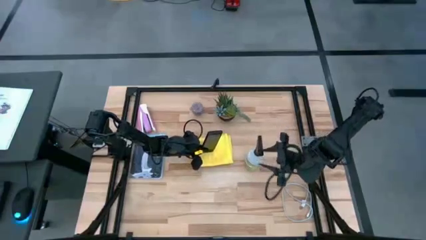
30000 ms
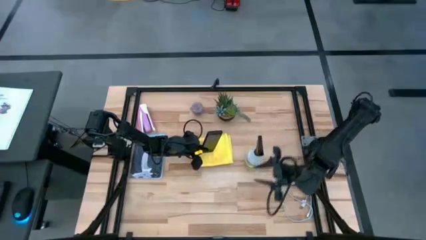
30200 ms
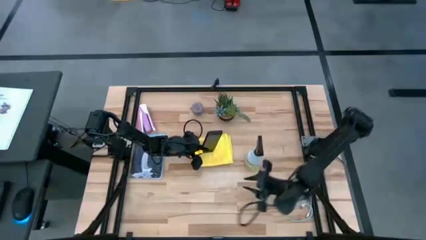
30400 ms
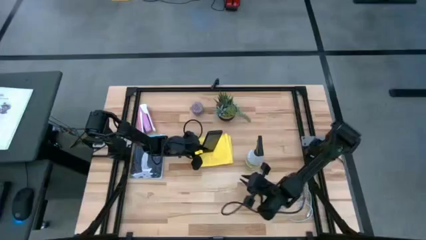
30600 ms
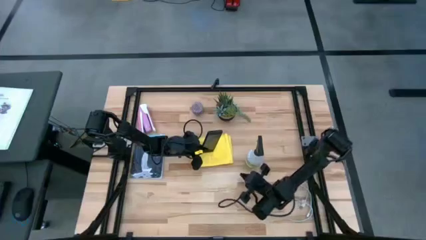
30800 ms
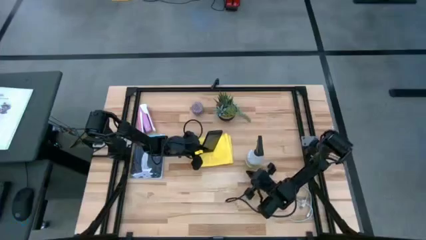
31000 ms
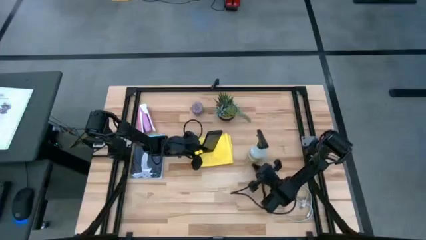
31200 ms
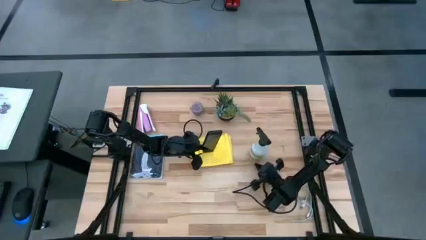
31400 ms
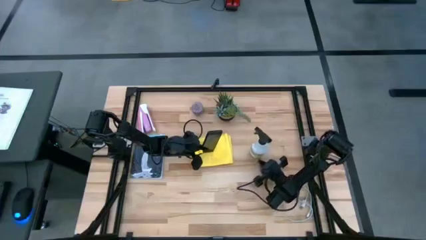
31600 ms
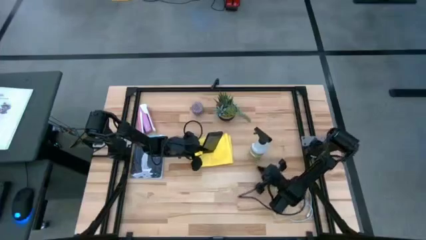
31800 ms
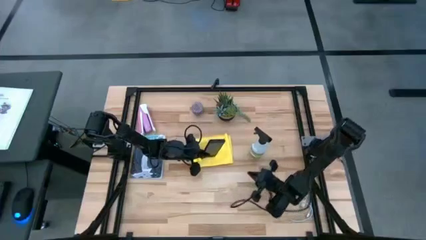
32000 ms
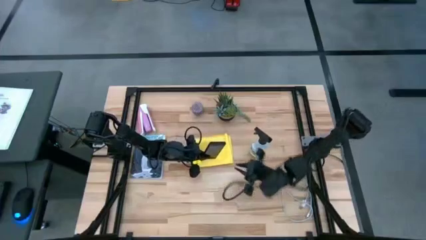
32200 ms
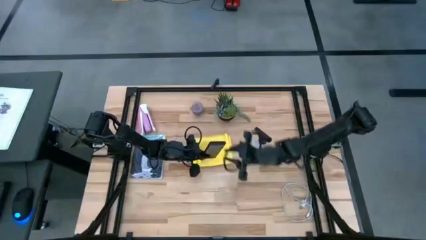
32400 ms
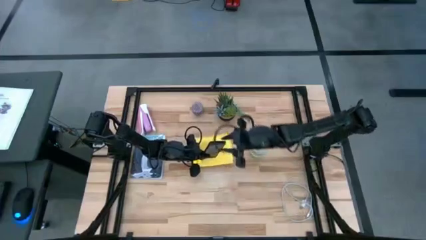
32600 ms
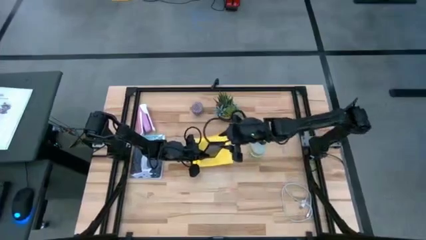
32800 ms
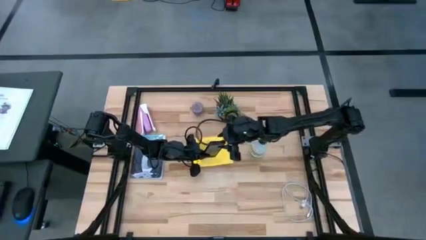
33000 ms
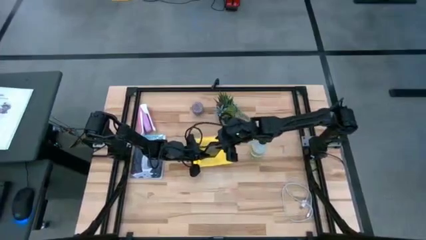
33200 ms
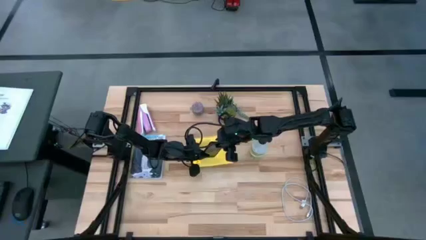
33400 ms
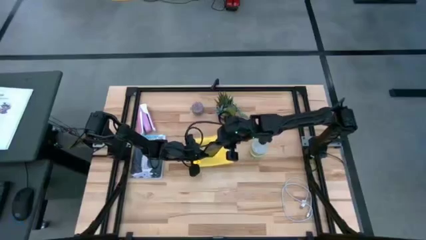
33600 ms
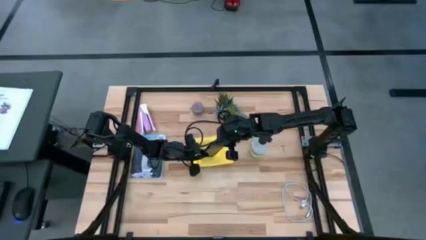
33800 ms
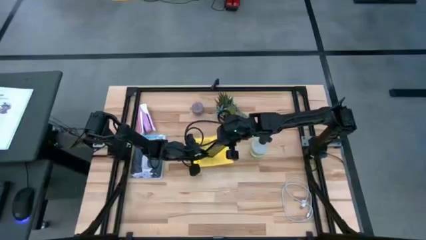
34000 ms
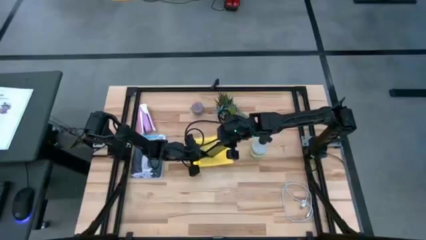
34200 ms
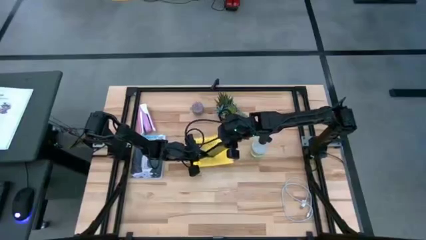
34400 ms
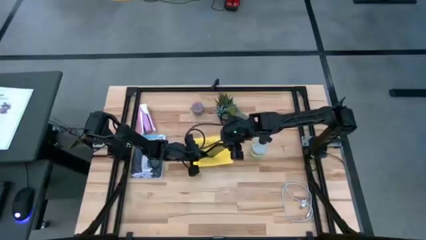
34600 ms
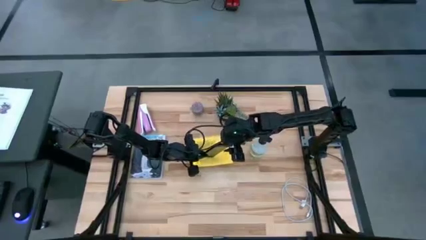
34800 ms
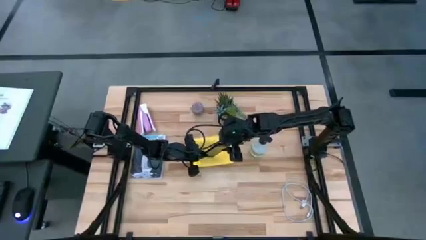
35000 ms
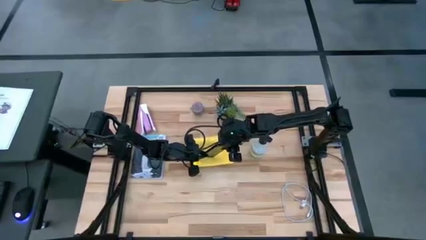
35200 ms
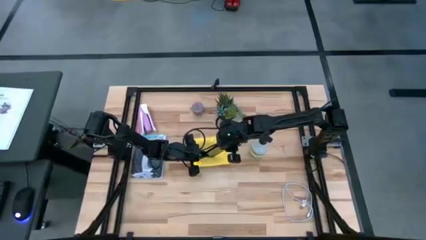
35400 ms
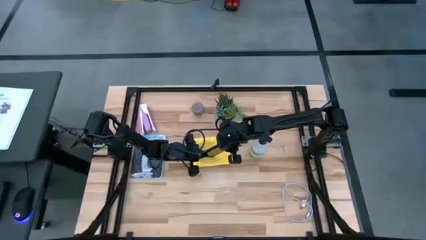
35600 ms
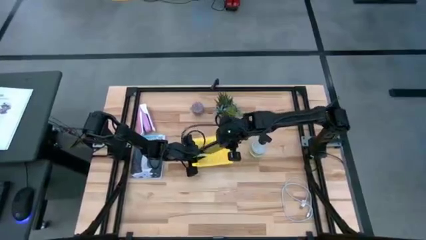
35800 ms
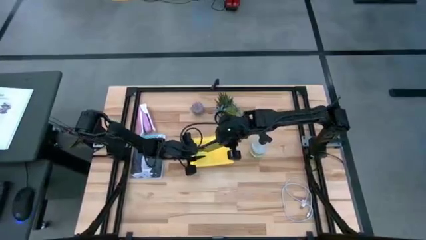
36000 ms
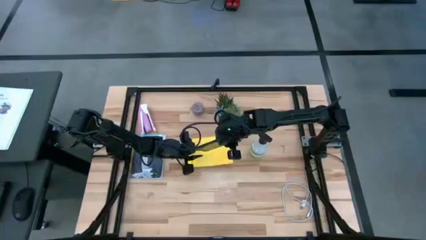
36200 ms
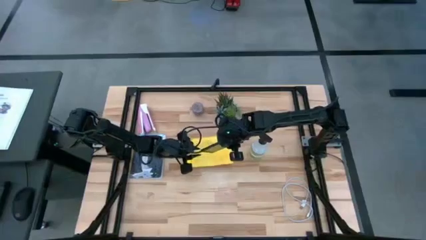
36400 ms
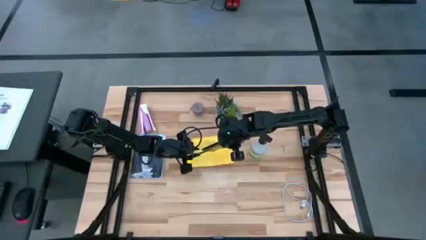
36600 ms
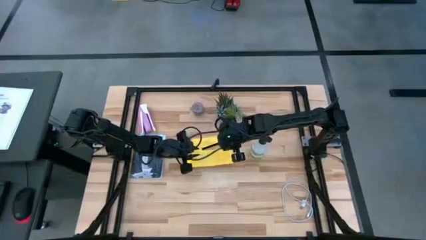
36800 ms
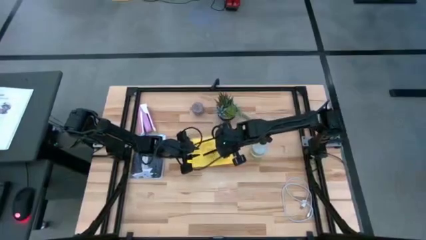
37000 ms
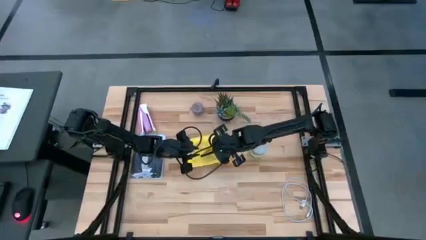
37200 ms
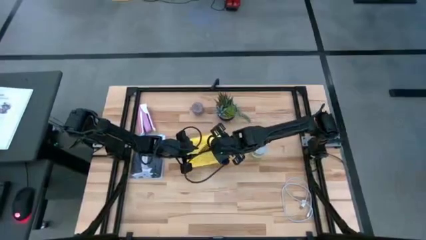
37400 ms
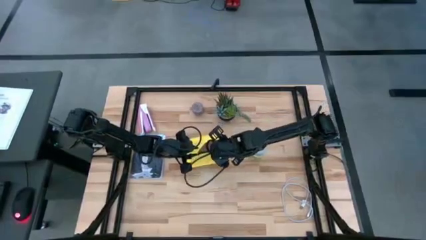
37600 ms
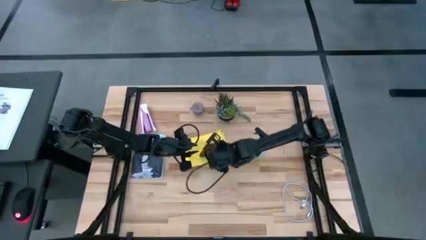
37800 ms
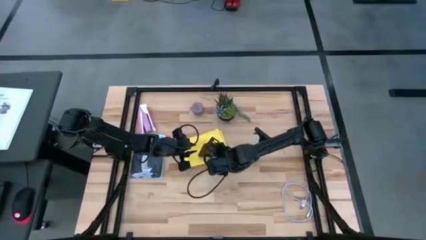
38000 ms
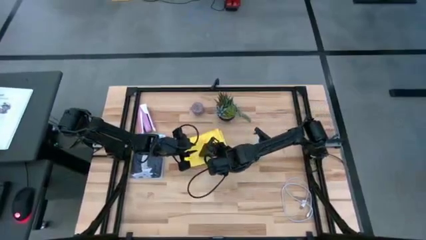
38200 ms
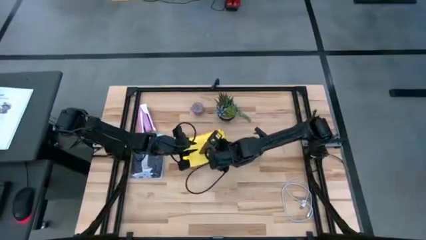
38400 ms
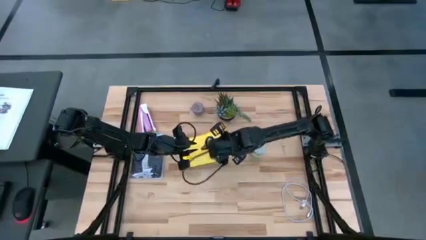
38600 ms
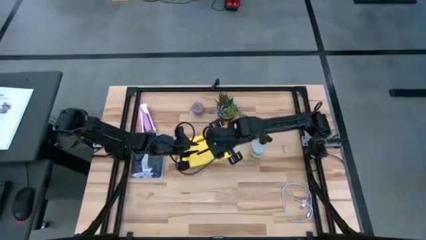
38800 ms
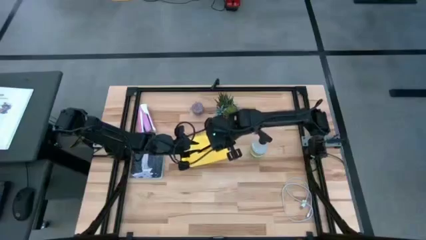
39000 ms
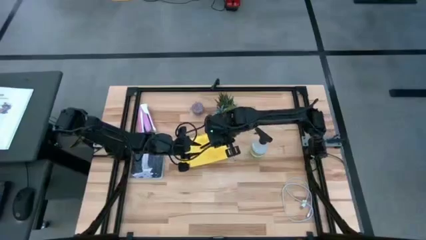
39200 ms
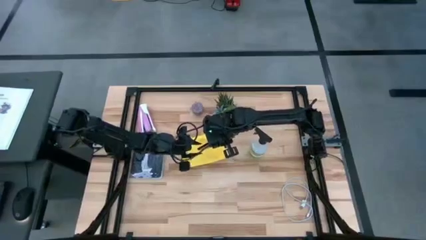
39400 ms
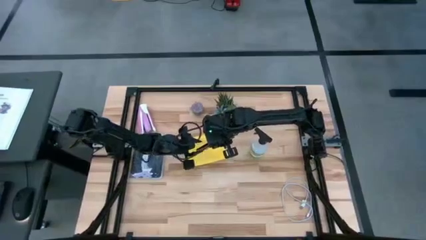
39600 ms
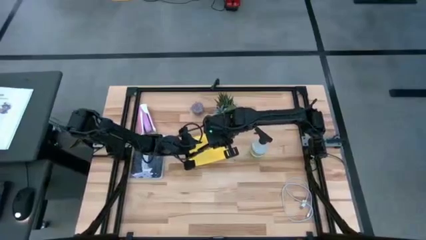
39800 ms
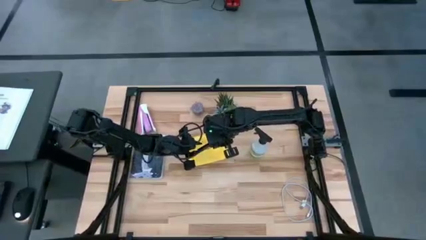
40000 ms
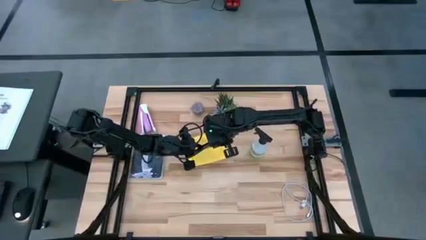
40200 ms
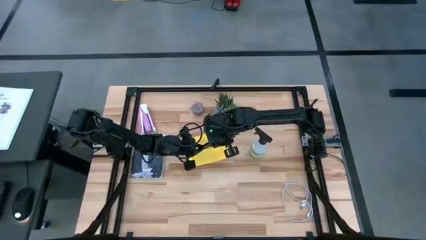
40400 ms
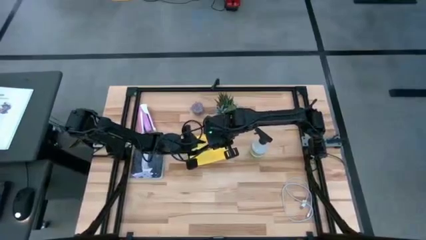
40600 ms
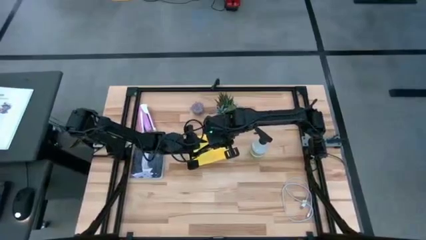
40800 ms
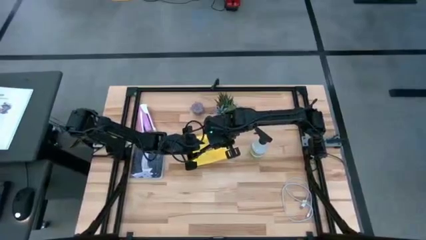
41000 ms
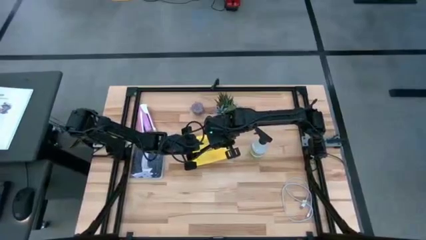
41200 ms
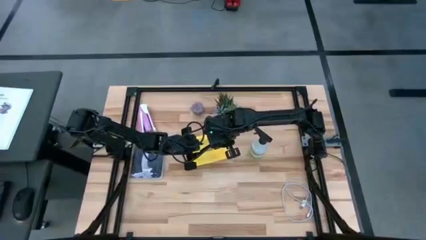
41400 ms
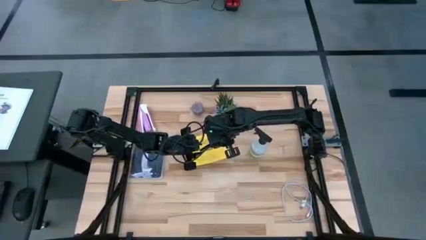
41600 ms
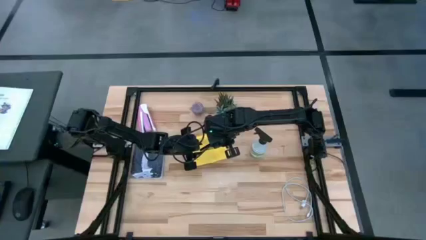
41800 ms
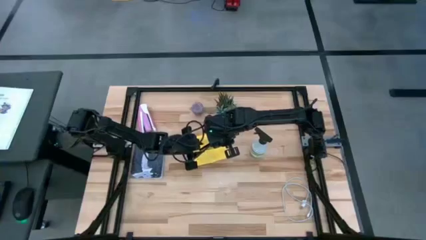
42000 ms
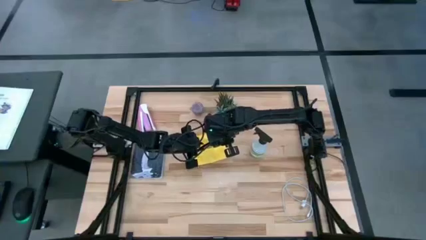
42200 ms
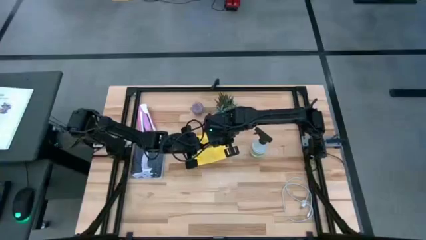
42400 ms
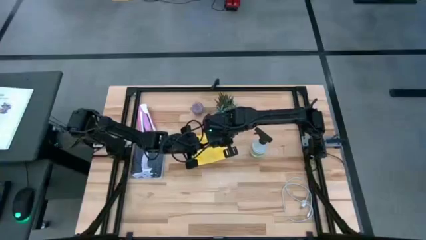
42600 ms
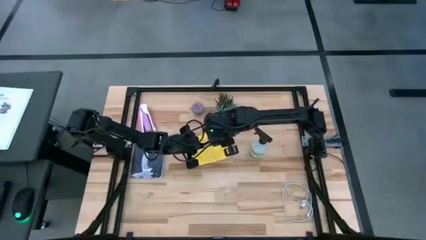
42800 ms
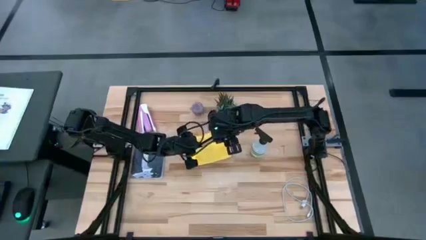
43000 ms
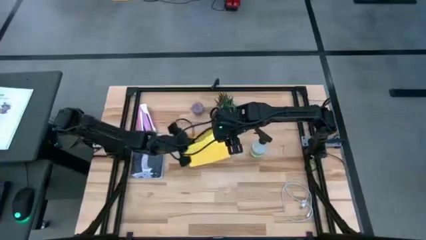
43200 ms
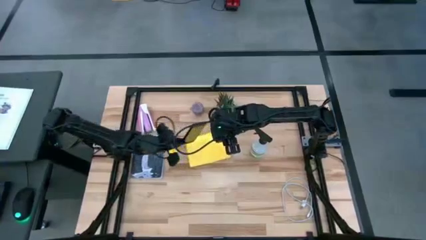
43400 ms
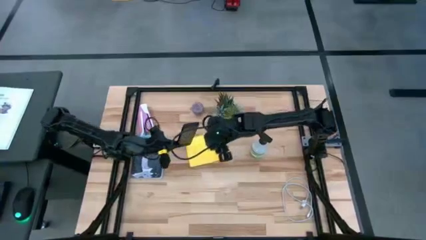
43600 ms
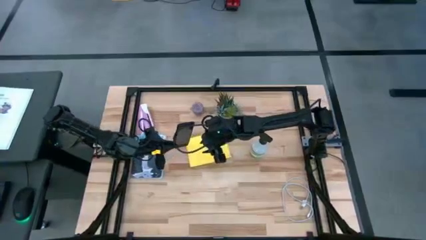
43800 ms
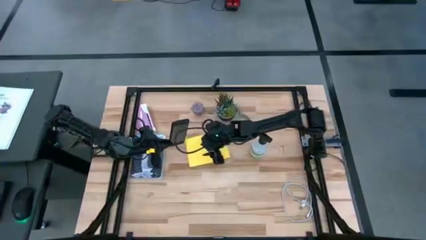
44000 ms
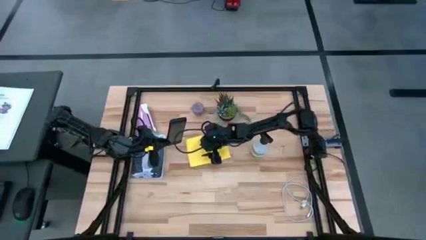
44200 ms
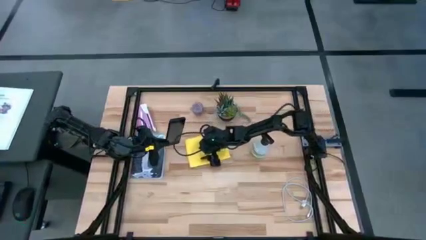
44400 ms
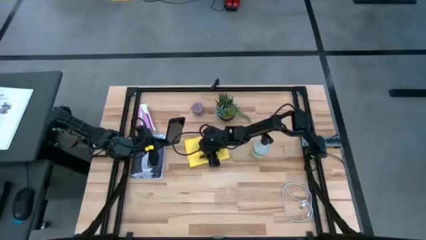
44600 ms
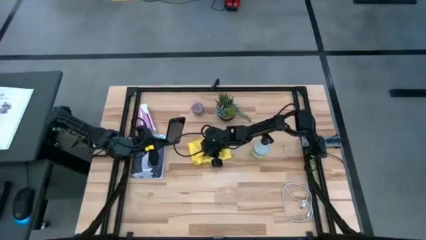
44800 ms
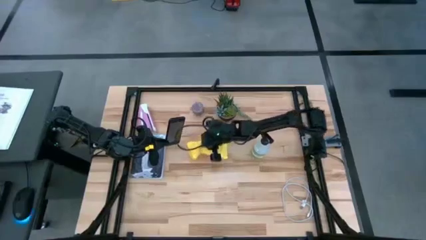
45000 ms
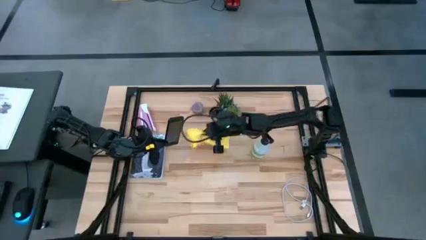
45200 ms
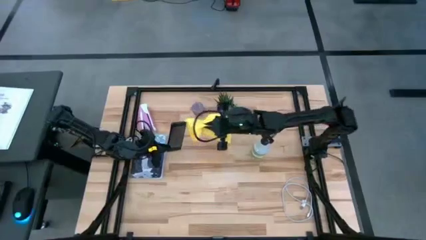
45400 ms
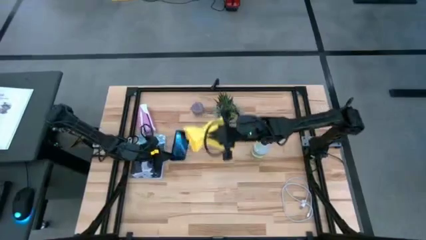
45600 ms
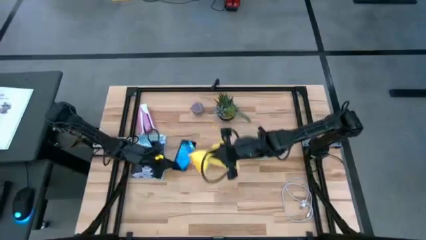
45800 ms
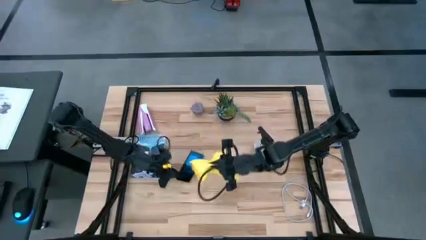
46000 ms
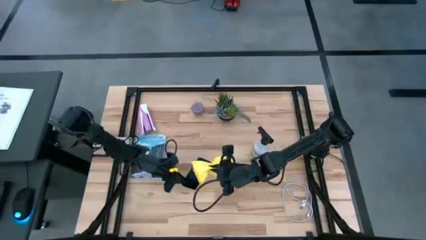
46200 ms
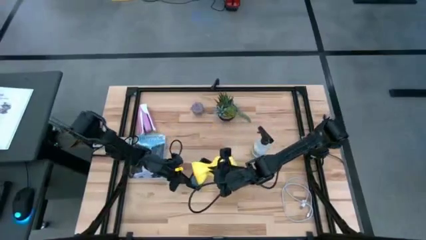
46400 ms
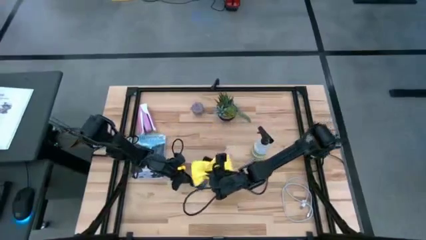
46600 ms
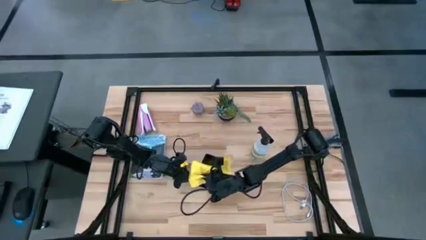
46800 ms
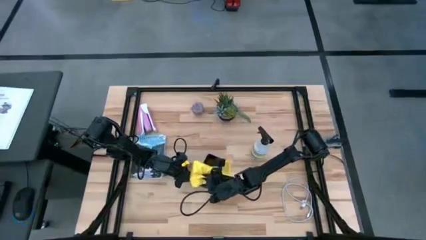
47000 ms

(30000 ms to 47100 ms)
Task: Apply microfiber cloth
Wipe the cellphone with the microfiber cloth
